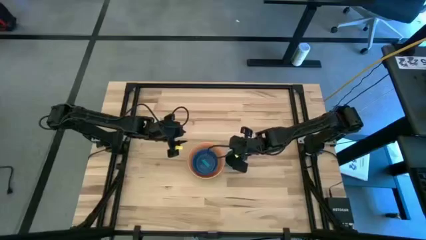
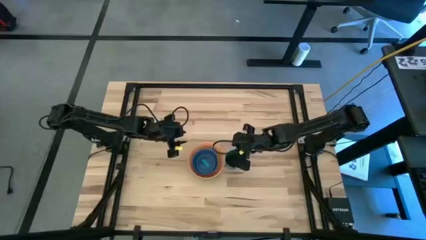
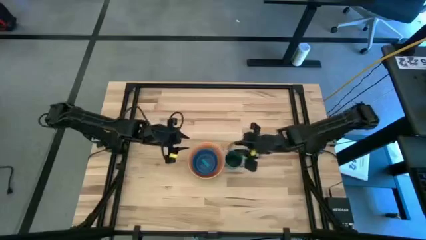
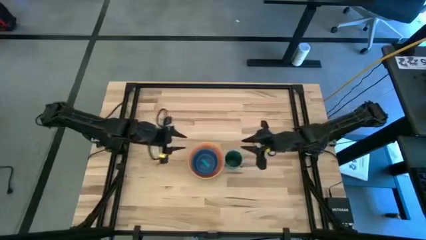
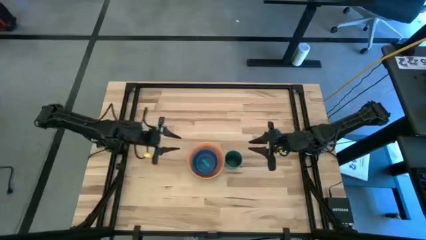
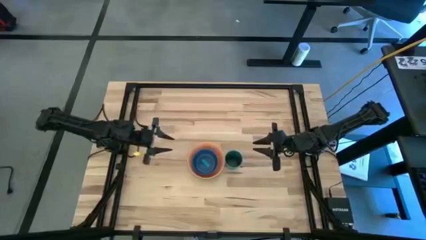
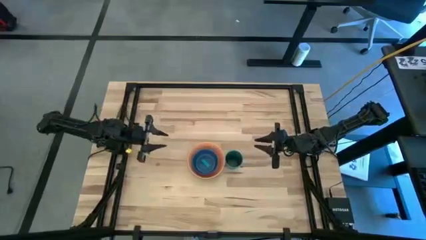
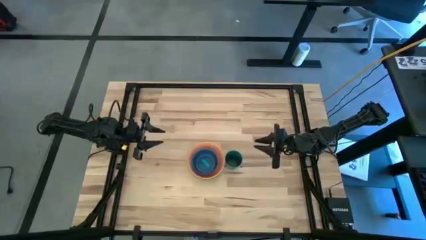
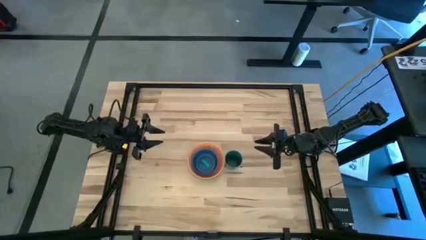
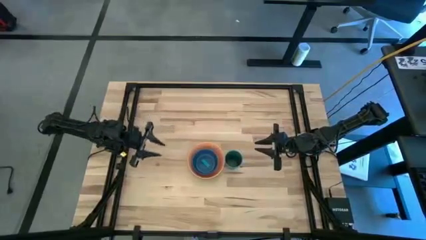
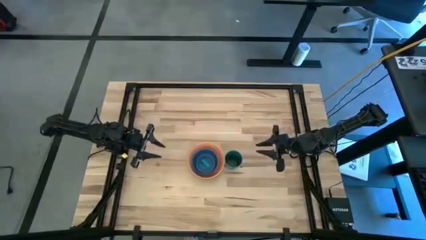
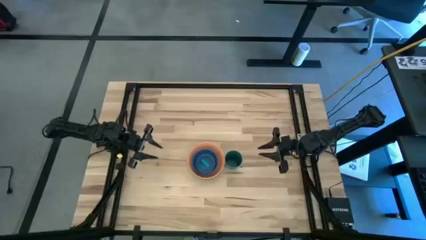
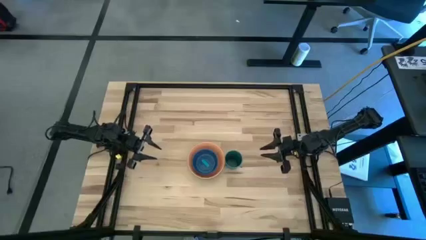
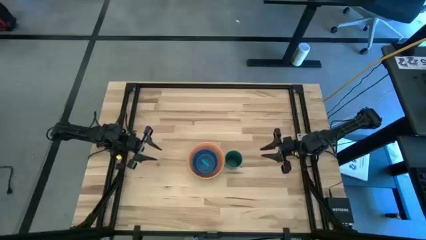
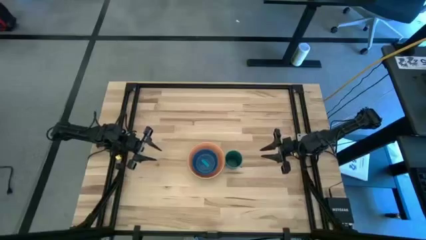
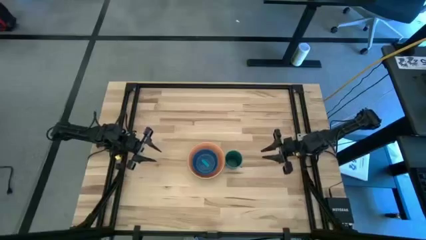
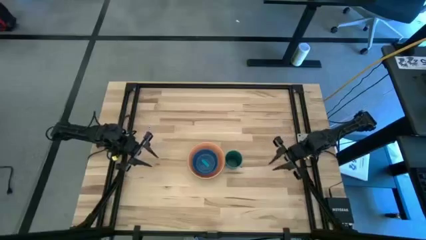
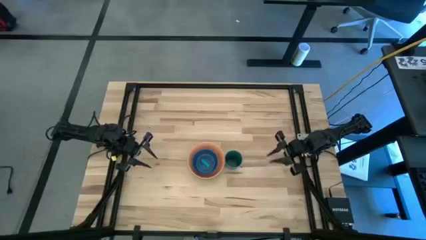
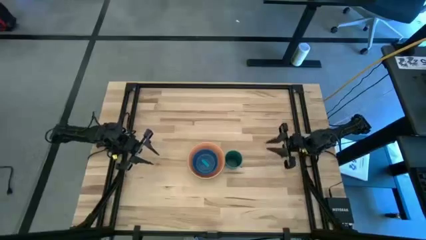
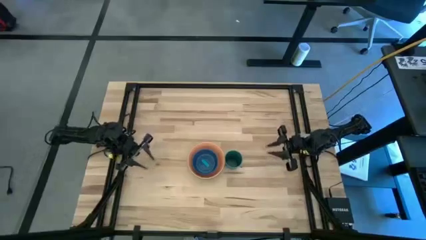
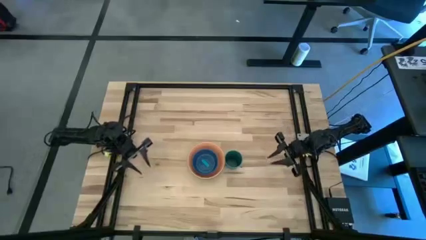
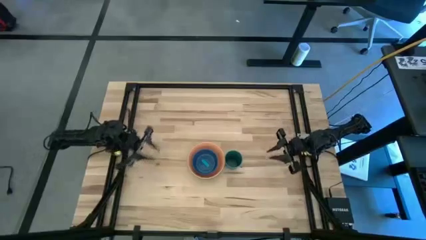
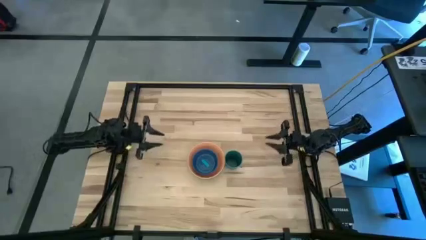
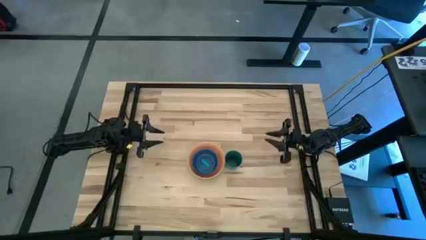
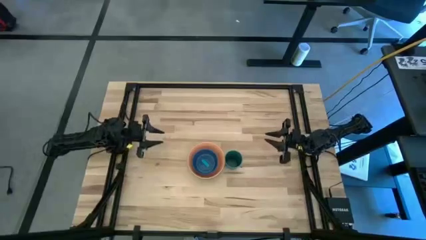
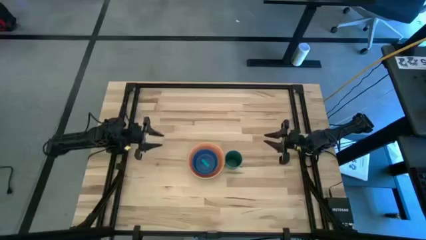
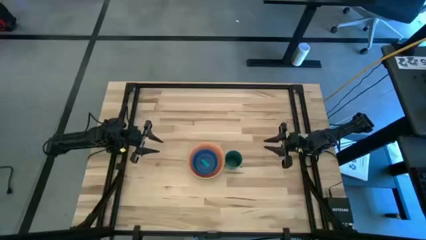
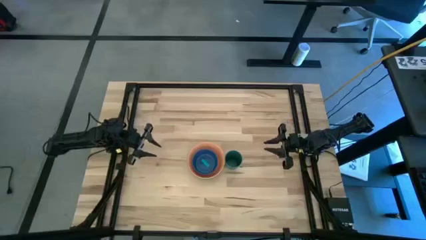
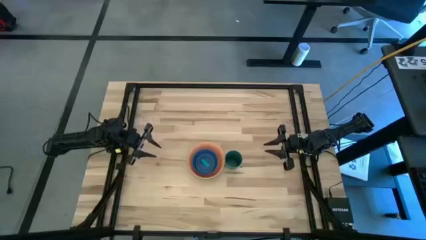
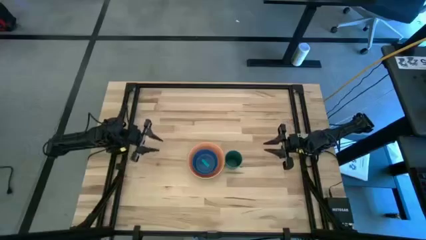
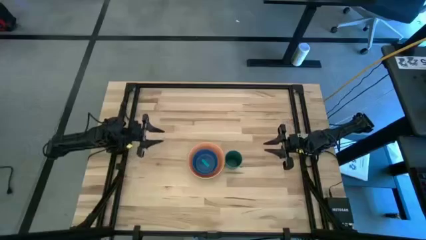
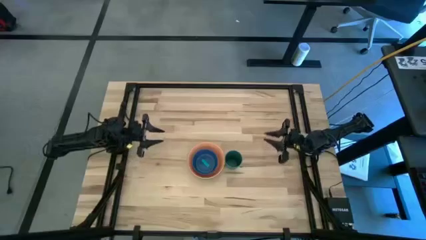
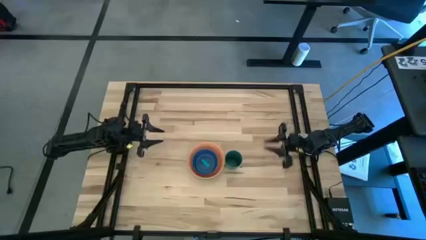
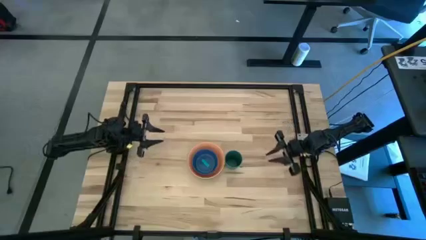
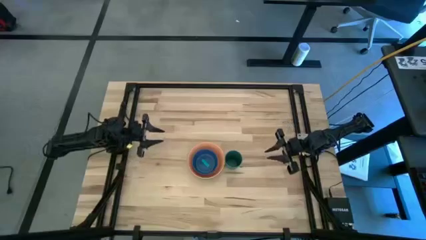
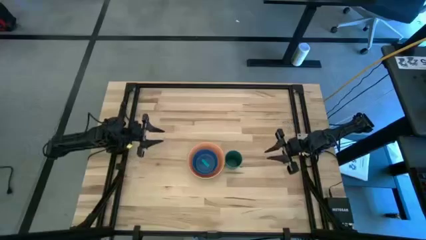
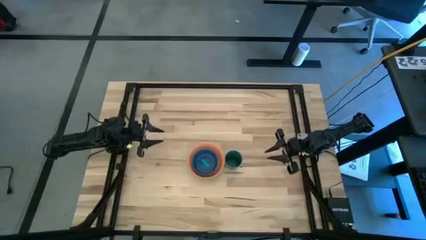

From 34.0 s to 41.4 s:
Return to Home Position

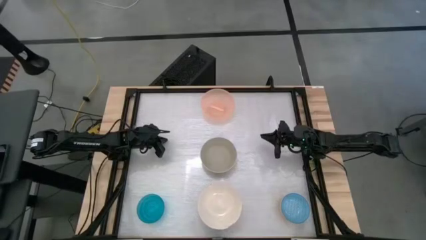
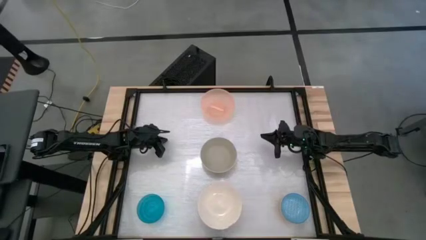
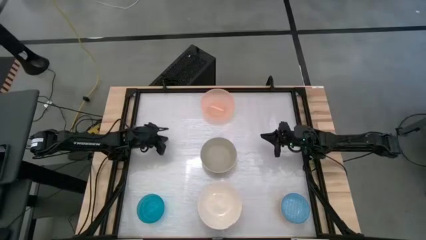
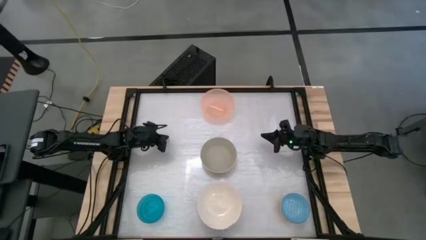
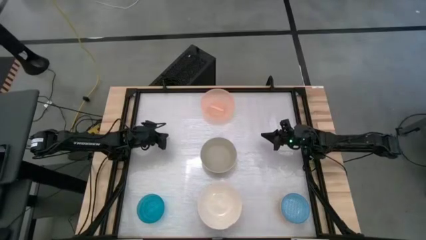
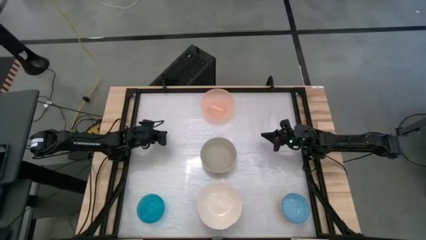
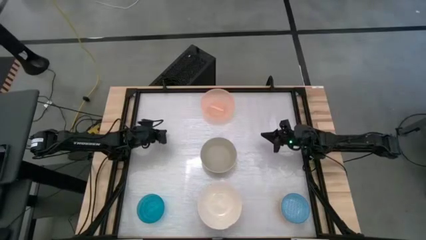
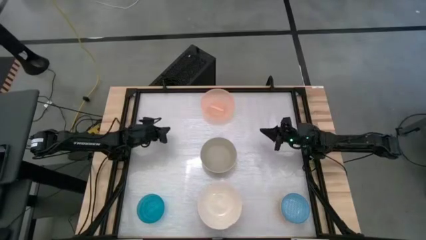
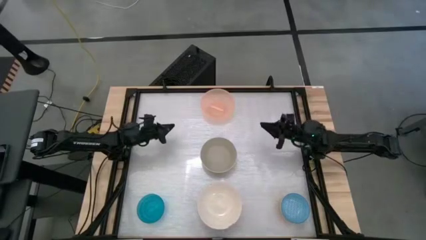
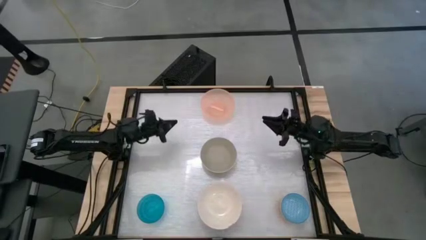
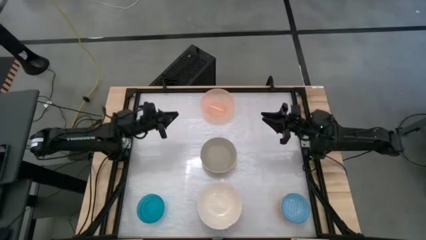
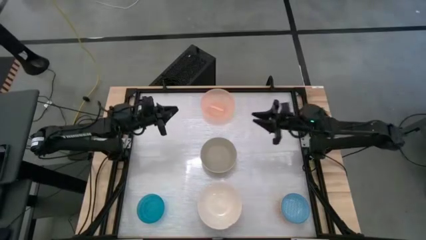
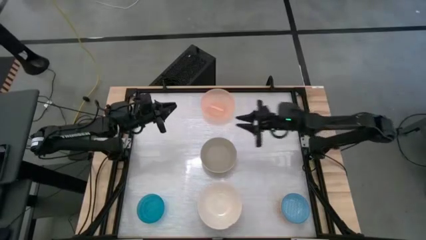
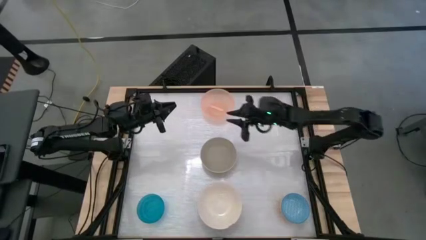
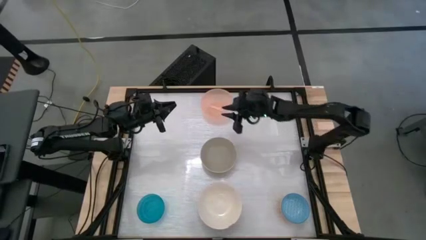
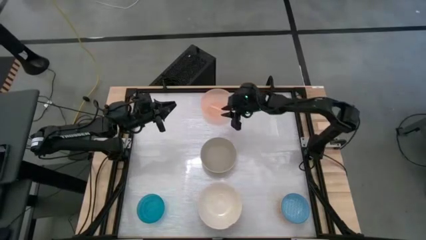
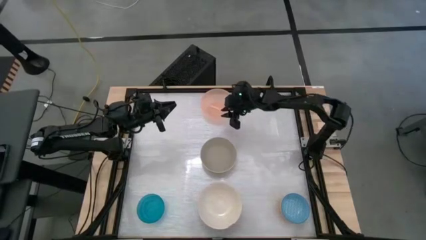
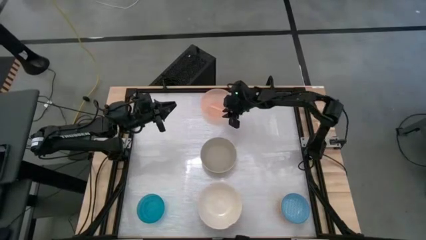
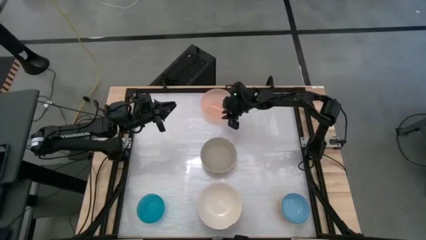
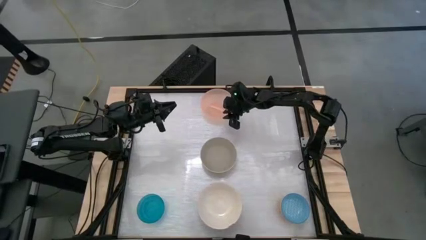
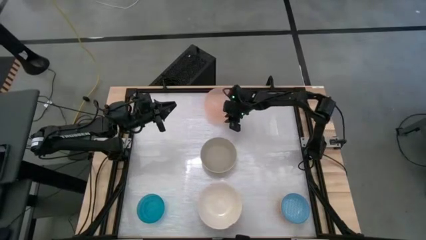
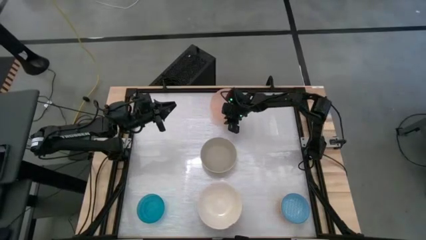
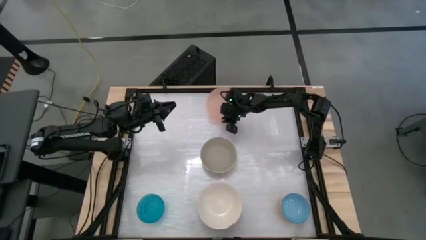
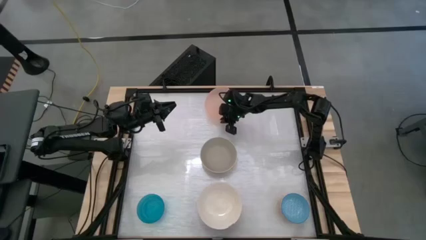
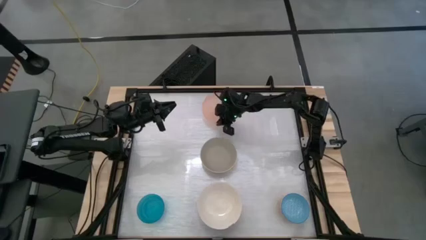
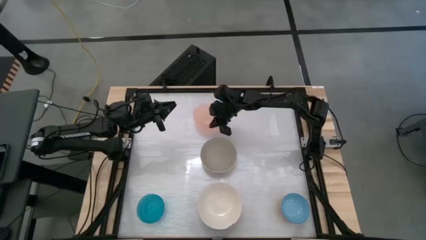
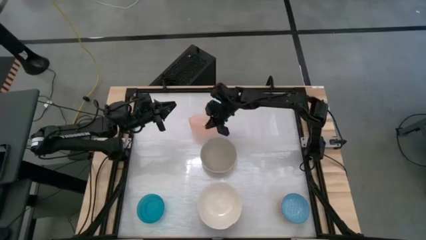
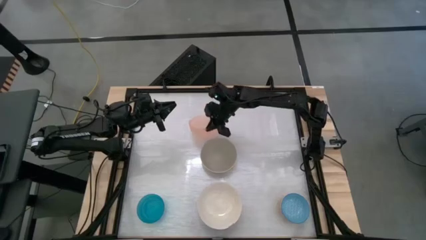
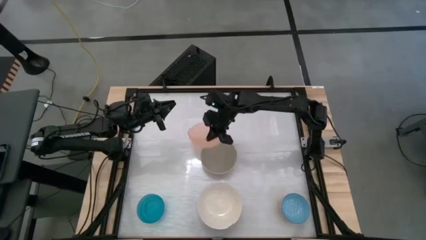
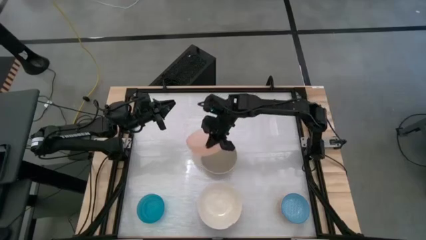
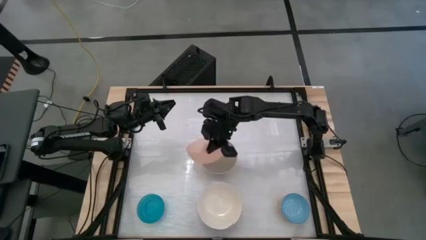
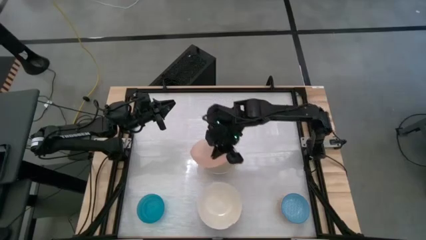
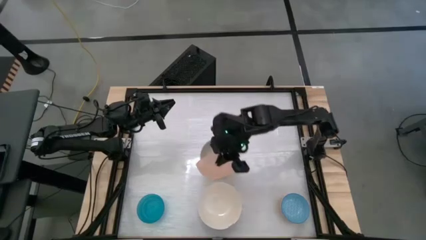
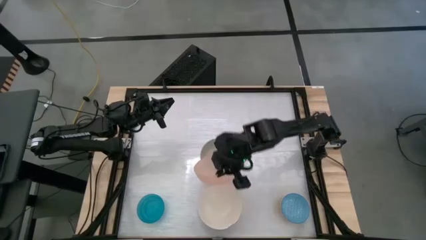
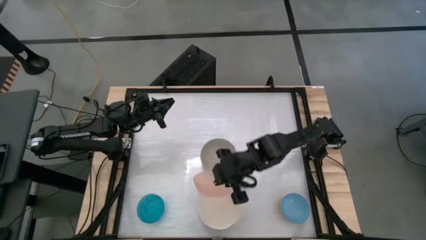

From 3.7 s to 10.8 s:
Stack the orange bowl on top of the white bowl
